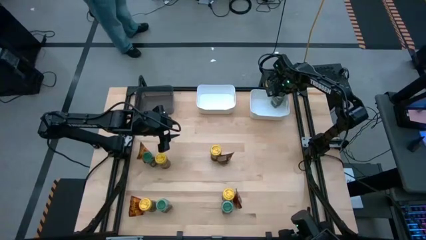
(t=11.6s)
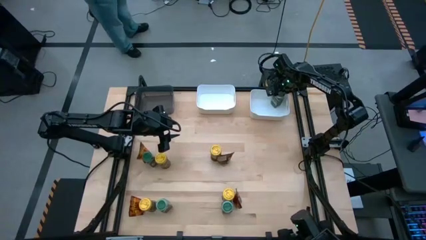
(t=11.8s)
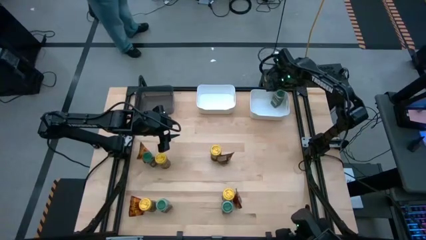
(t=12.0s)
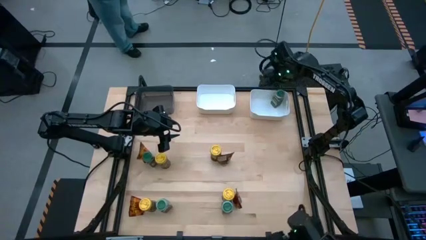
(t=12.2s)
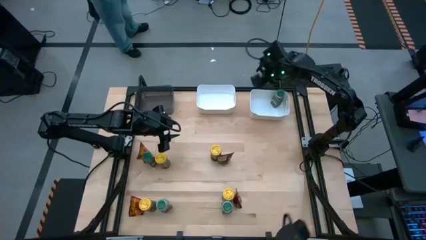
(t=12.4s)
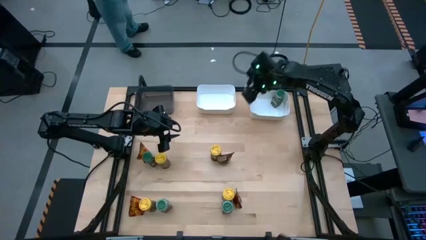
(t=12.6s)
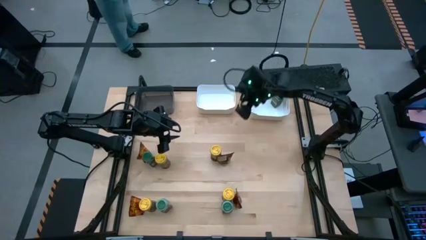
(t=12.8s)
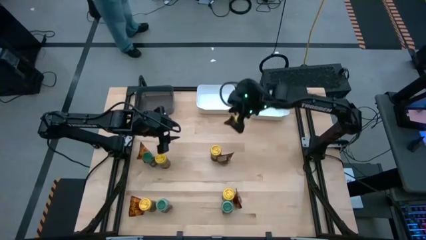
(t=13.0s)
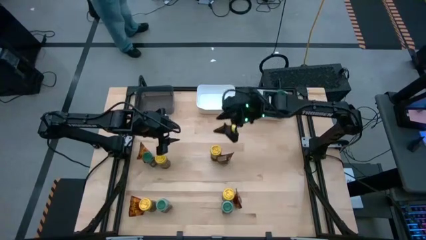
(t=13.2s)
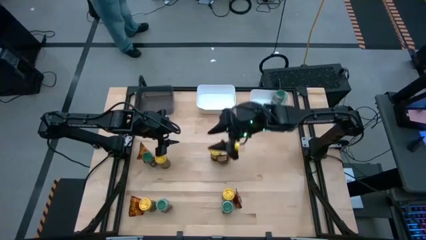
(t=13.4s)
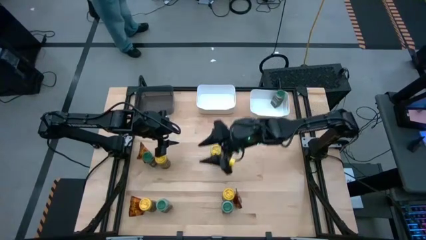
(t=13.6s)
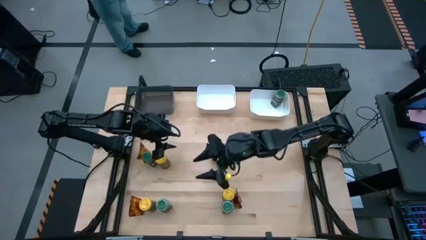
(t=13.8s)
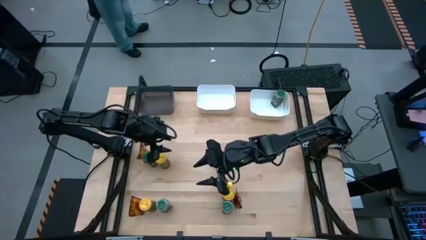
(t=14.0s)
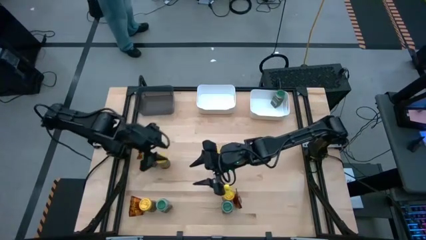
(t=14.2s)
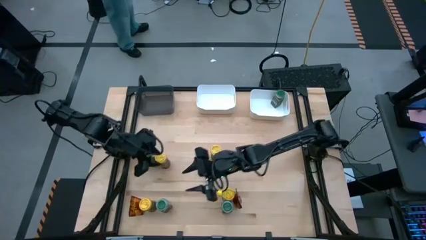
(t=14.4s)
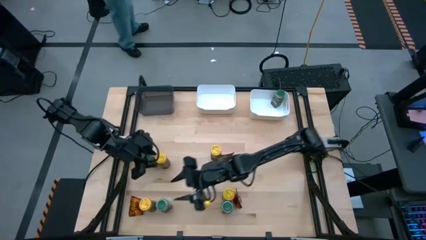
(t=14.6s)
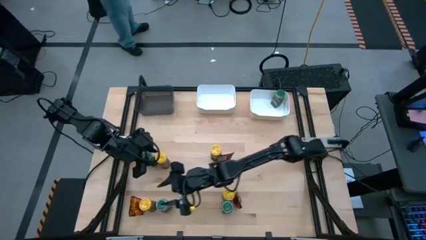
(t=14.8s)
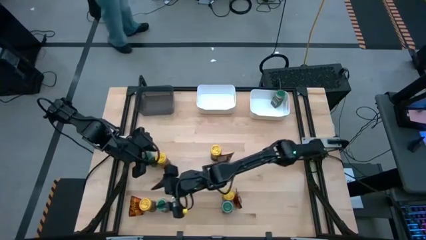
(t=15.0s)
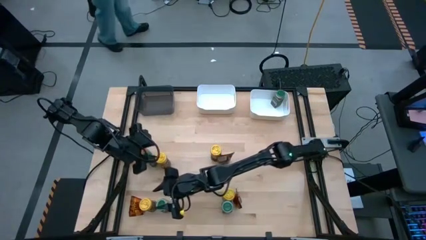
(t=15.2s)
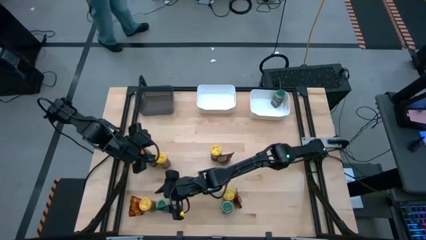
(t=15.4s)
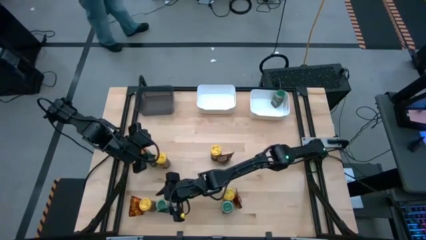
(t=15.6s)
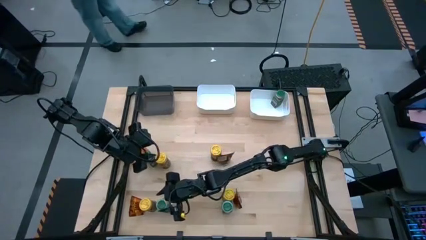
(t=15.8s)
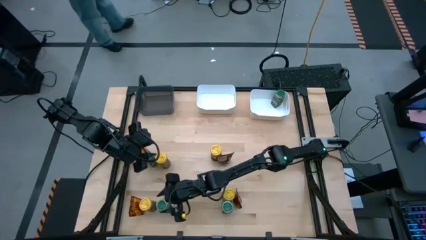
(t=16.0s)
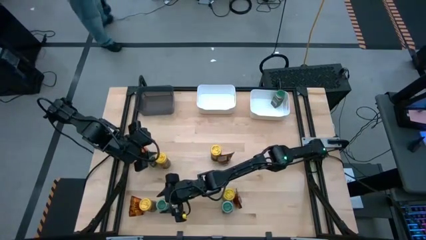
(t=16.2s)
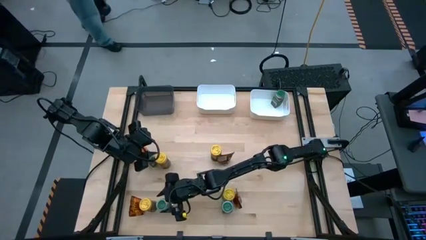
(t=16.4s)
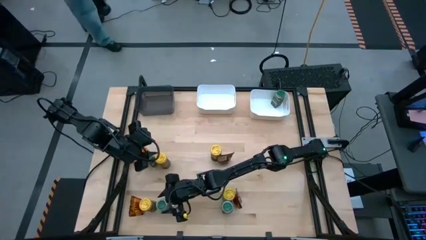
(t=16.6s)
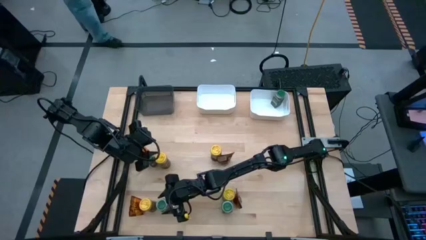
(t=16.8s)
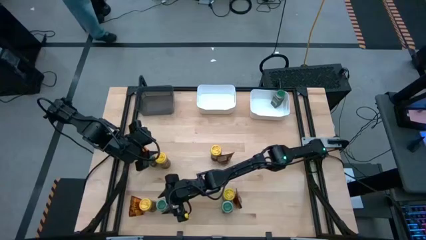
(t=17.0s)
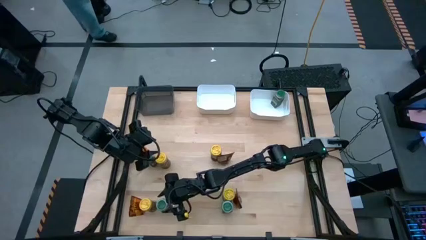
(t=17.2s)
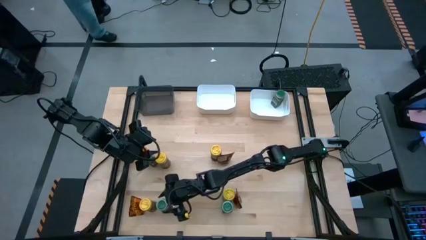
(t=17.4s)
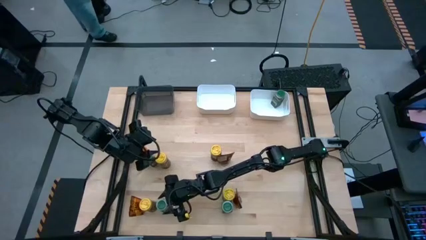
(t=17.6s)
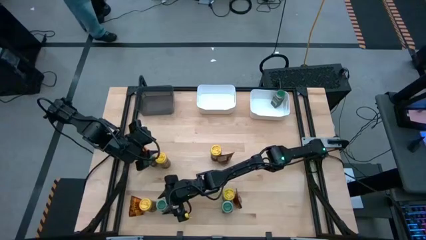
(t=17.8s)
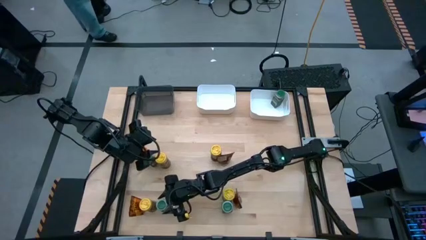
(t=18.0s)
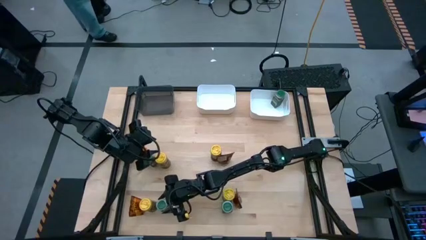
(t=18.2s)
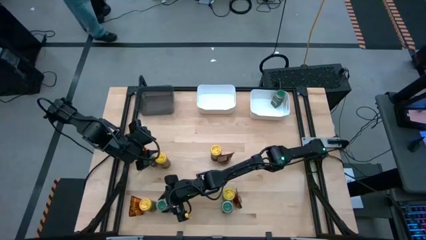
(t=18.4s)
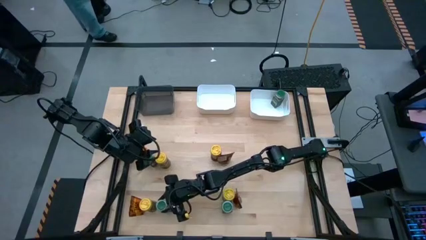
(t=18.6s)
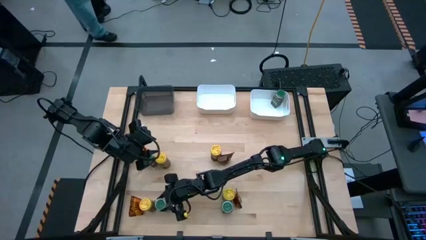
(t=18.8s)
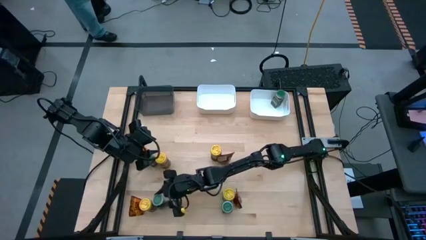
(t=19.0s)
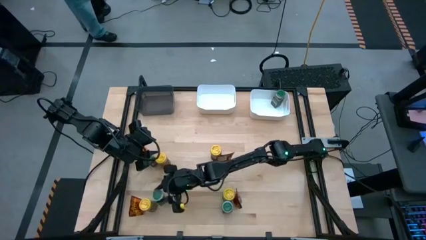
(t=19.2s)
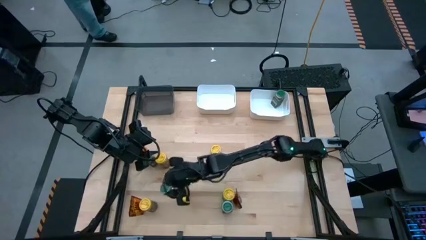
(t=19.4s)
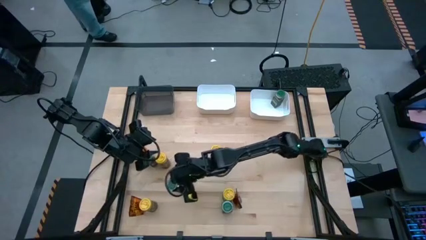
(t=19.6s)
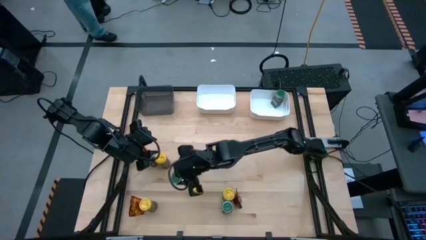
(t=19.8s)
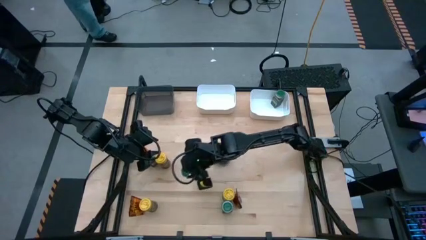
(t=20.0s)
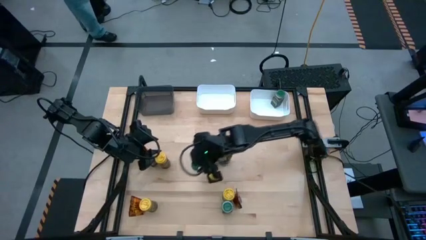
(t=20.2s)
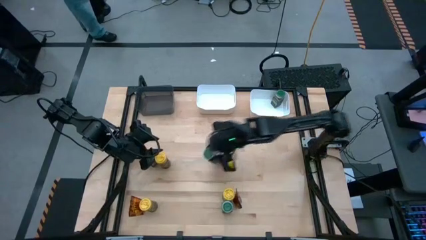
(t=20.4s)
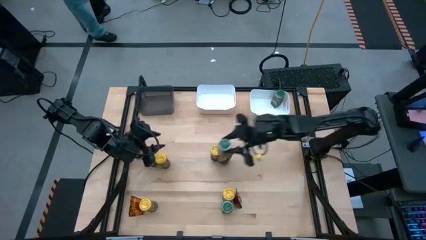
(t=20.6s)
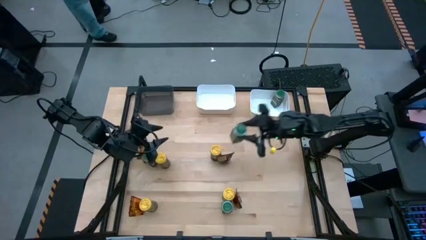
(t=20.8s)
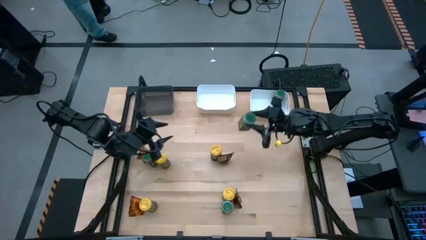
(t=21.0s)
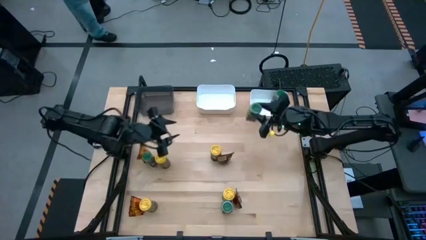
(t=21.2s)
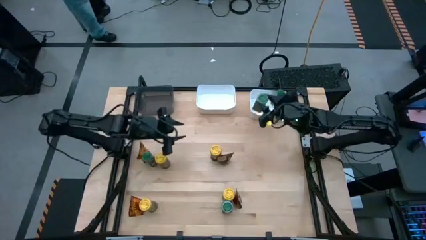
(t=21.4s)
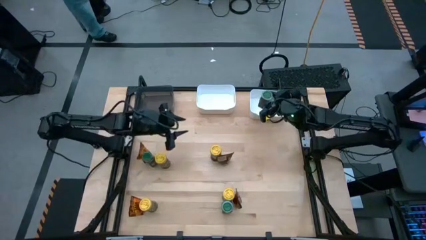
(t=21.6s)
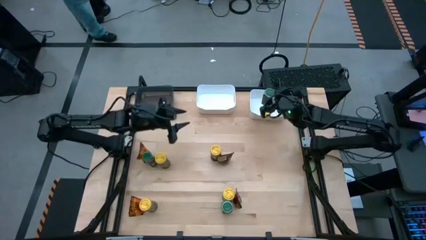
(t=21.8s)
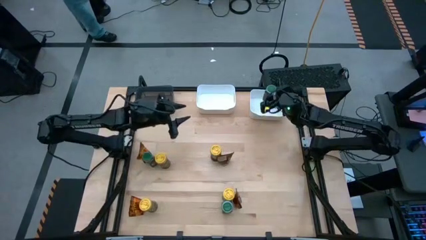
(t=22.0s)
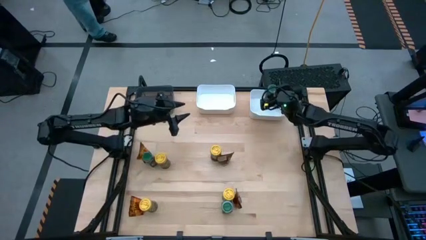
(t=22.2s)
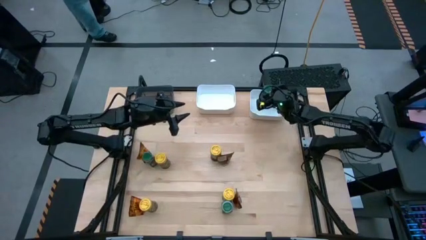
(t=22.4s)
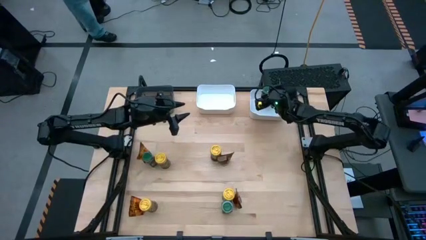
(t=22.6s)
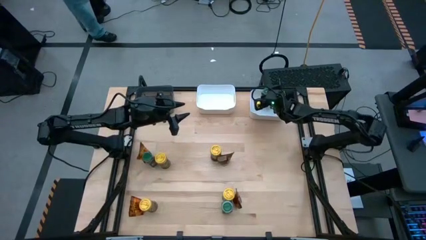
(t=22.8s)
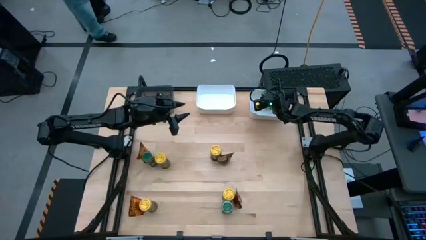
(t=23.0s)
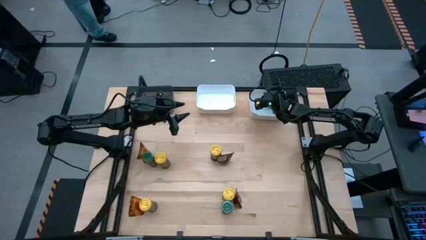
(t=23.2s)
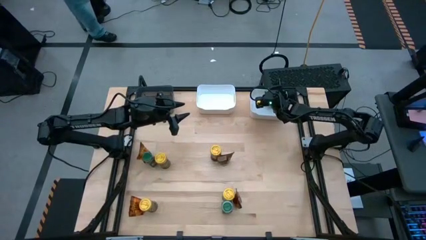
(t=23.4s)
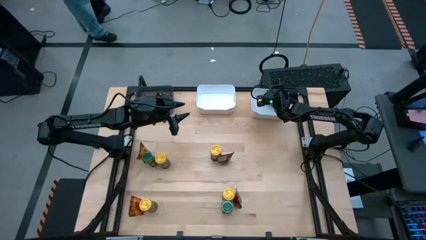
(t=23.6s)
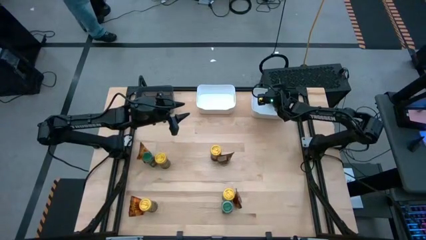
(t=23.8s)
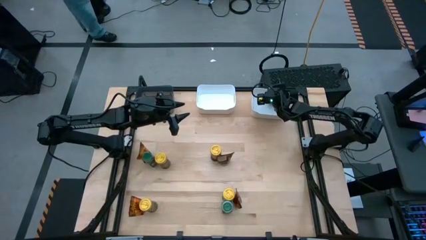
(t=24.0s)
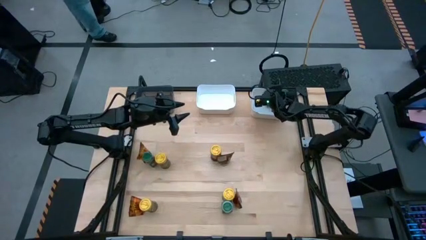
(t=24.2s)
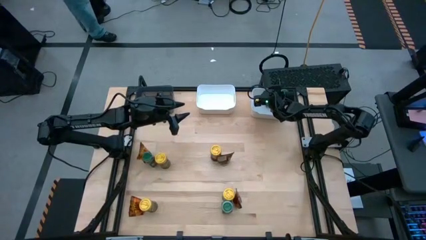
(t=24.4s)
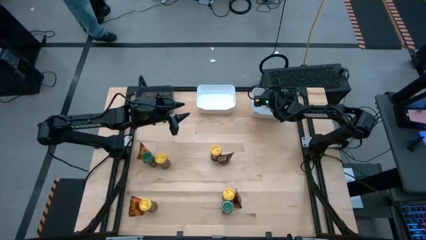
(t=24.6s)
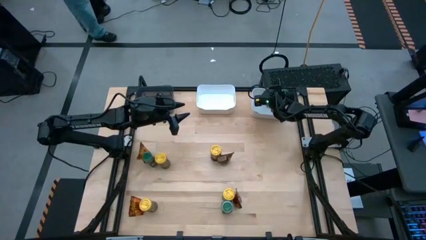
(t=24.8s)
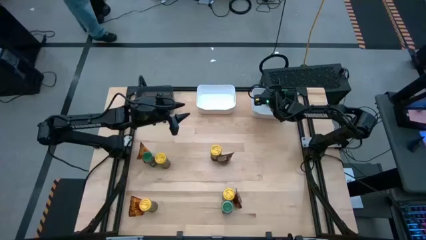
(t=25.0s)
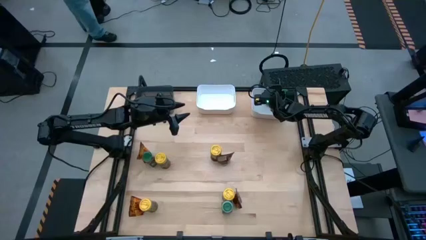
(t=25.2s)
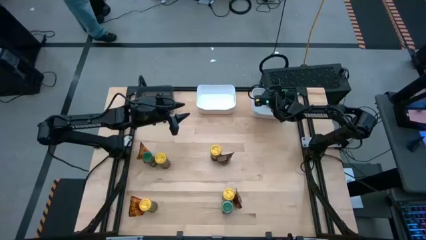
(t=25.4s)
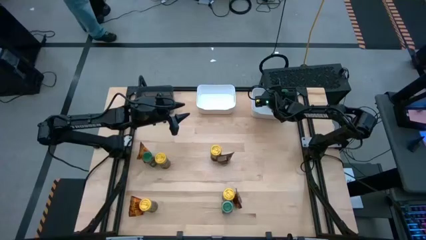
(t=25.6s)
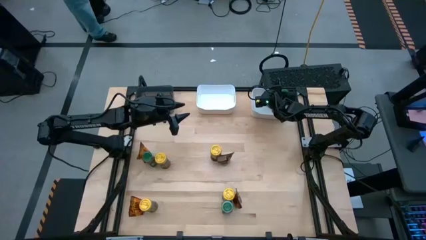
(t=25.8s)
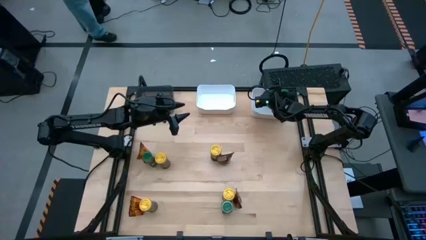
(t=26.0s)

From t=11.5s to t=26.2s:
Task: Sort spices by type
Put the bottom left green seasoning bottle into the right white bin
